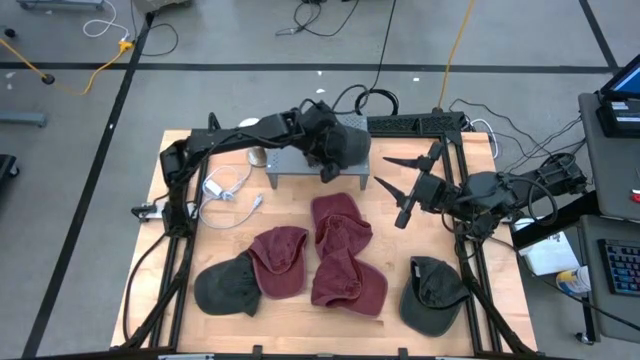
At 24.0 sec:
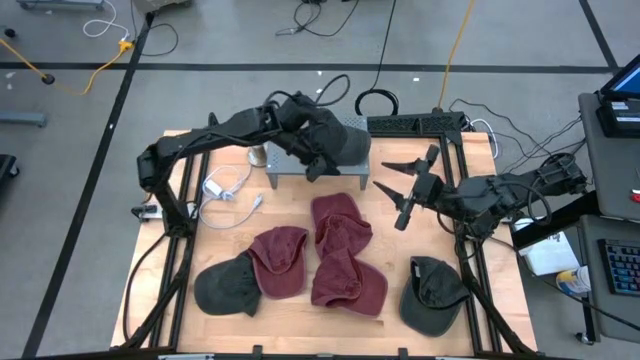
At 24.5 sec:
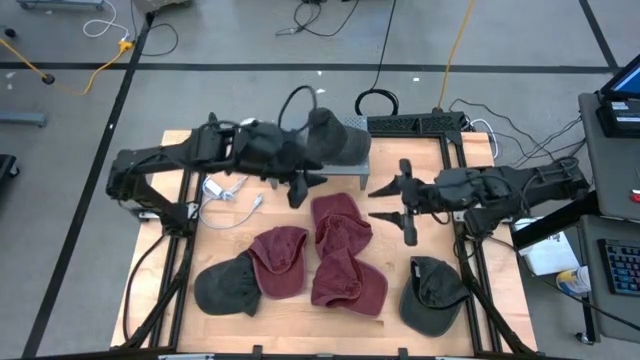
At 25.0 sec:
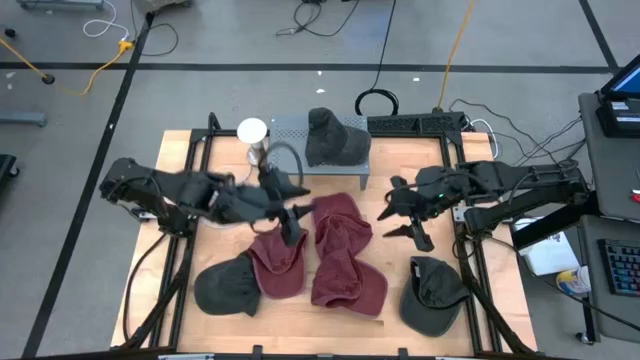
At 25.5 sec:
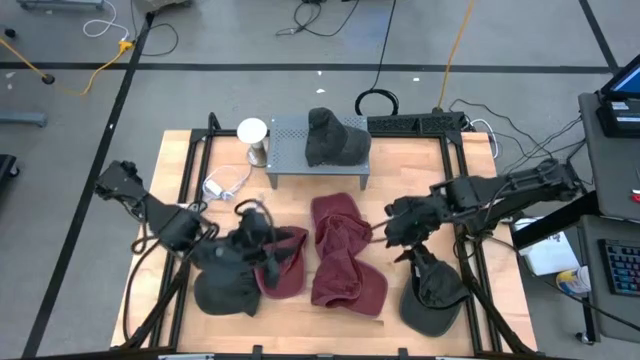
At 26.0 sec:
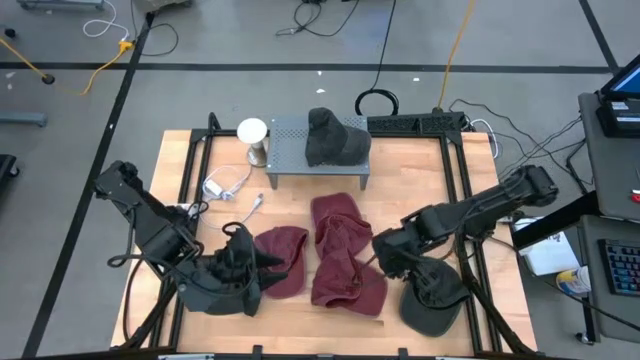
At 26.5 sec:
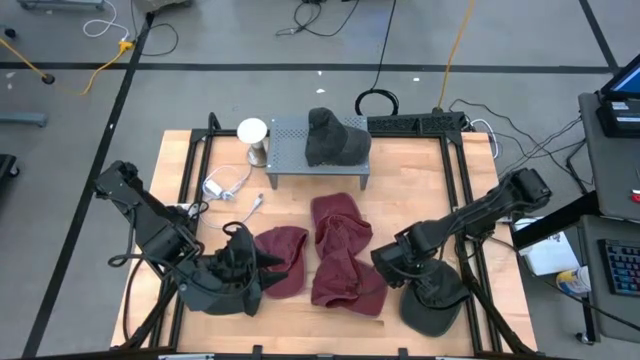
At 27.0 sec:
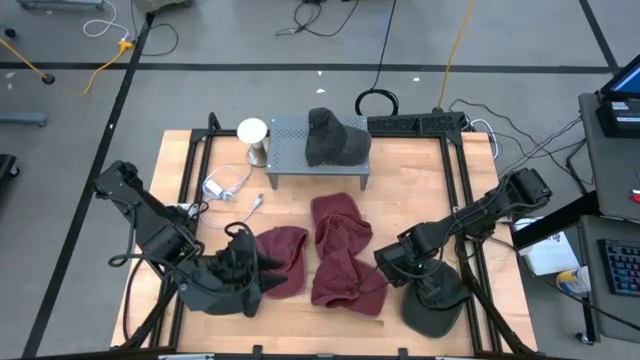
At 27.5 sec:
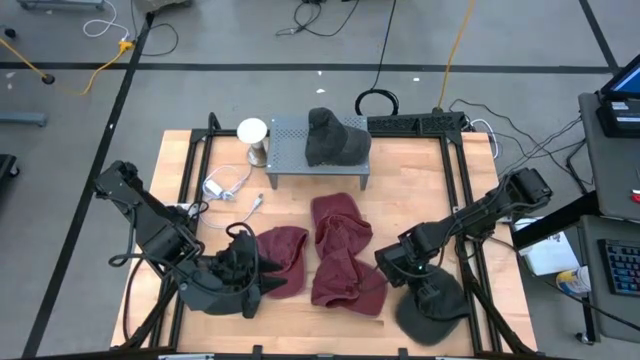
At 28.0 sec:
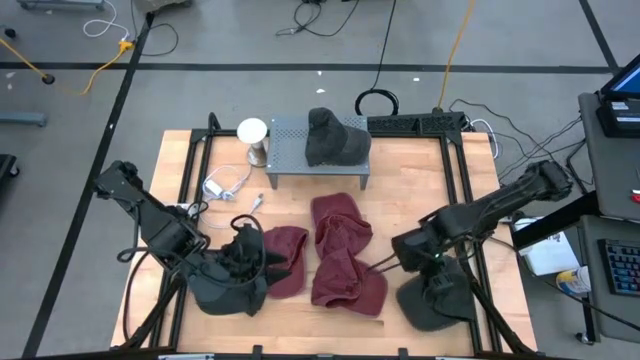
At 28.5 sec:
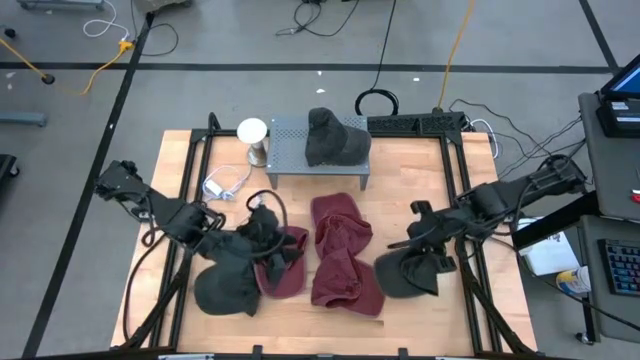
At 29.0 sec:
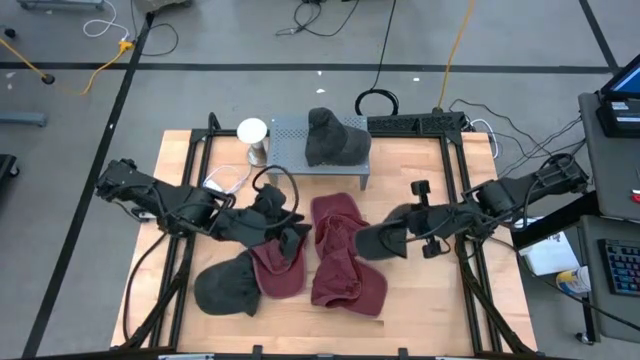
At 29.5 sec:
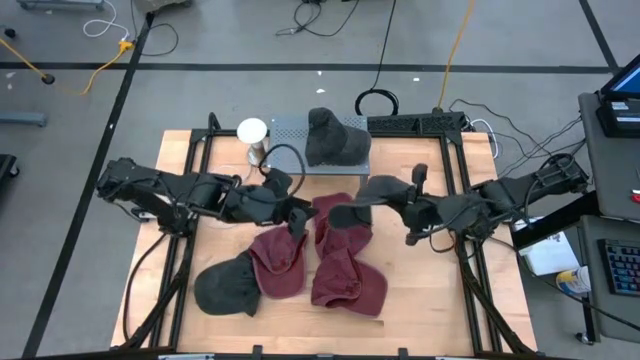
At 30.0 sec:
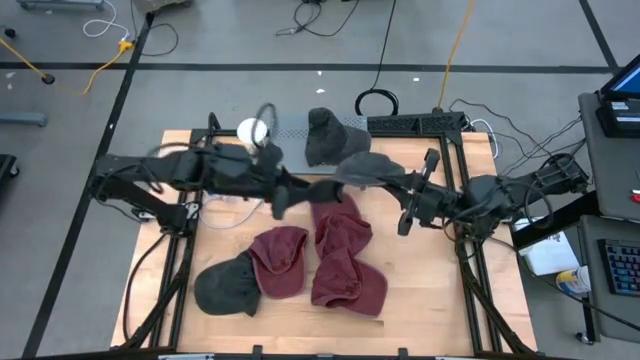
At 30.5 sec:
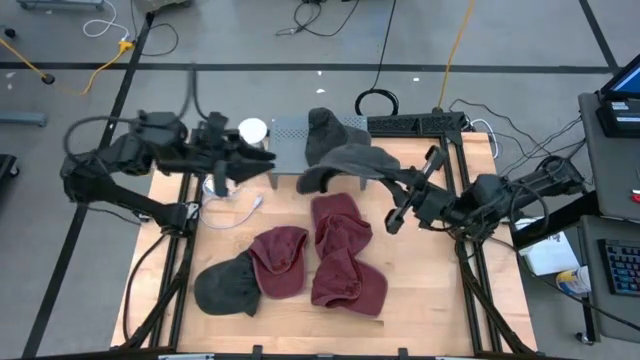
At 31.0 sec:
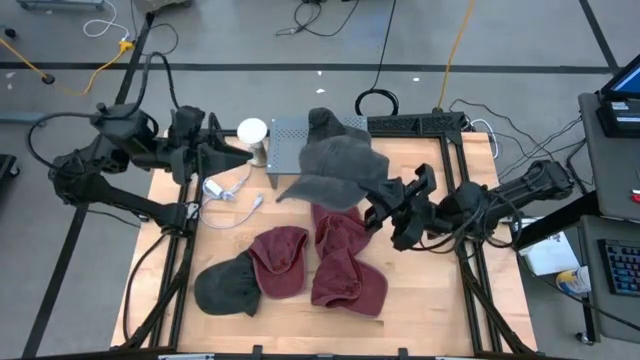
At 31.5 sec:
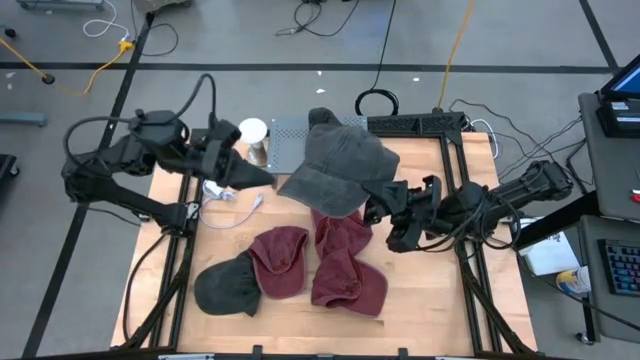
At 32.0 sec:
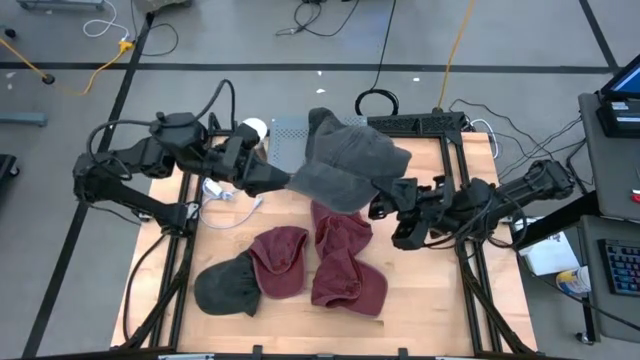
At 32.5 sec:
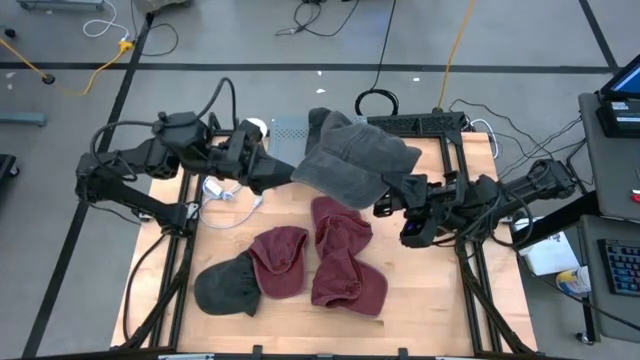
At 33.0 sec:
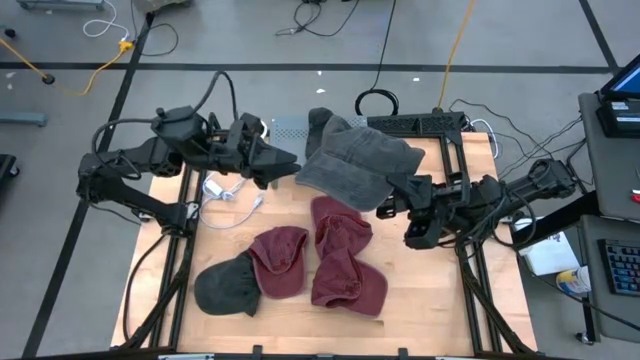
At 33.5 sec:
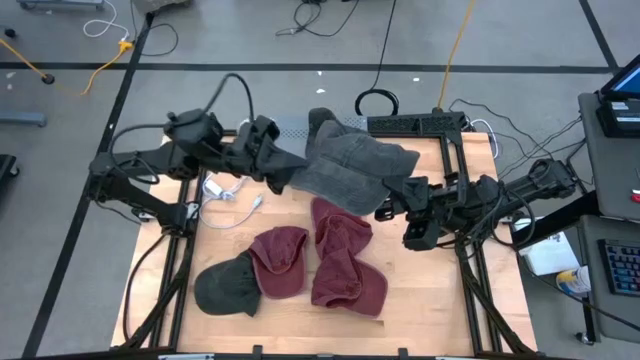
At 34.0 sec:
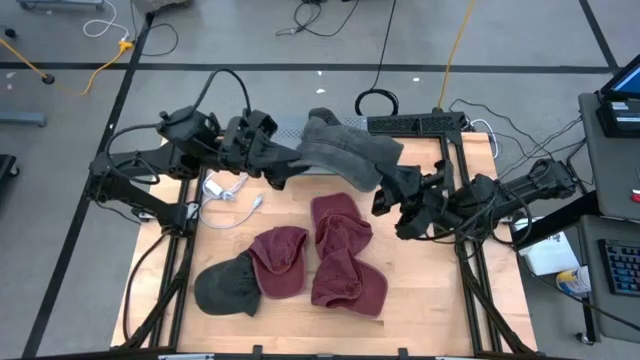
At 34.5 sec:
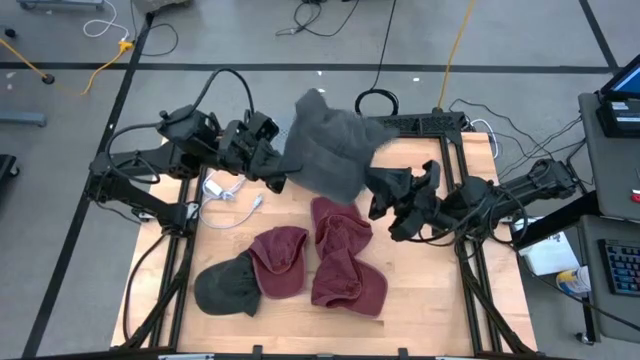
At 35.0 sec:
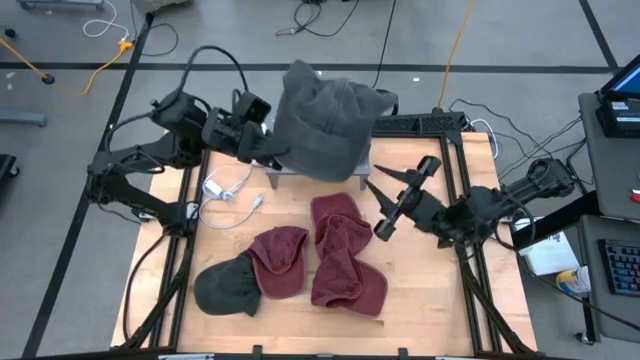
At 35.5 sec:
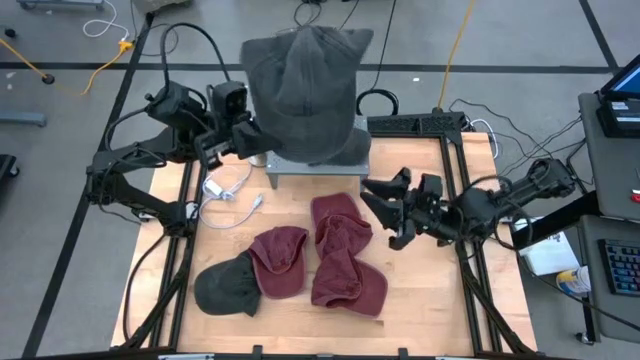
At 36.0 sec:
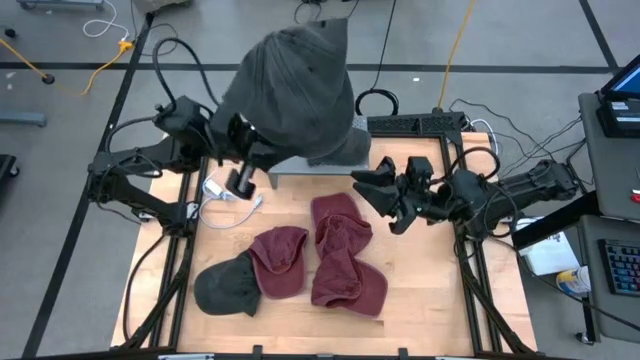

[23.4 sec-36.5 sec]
Task: Pick & Place hat
Stack the right black cap on top of the black cap on the shelf
